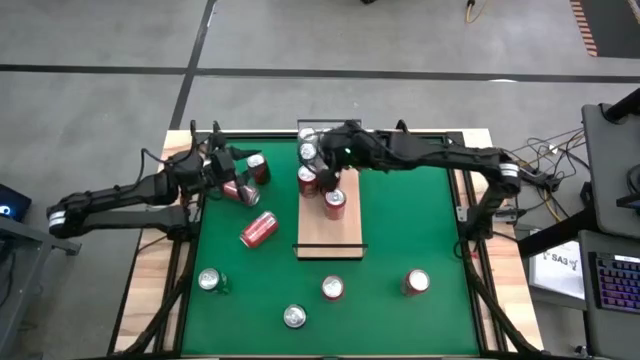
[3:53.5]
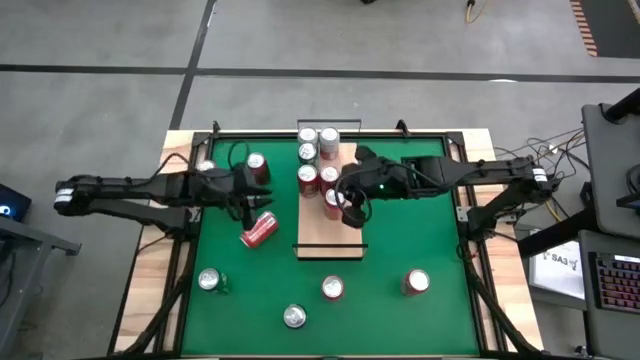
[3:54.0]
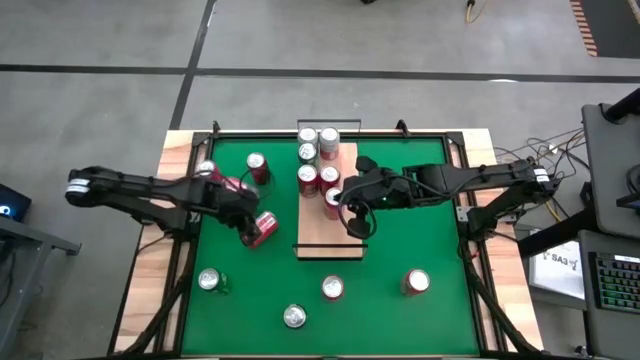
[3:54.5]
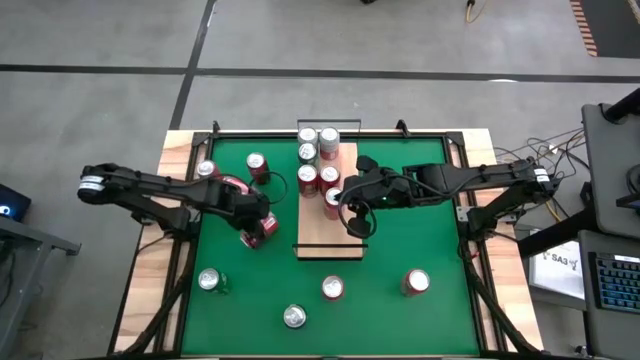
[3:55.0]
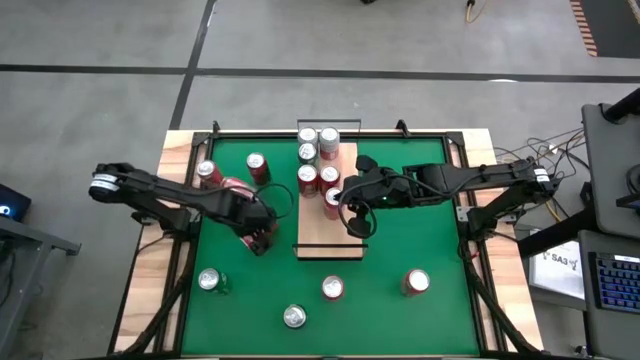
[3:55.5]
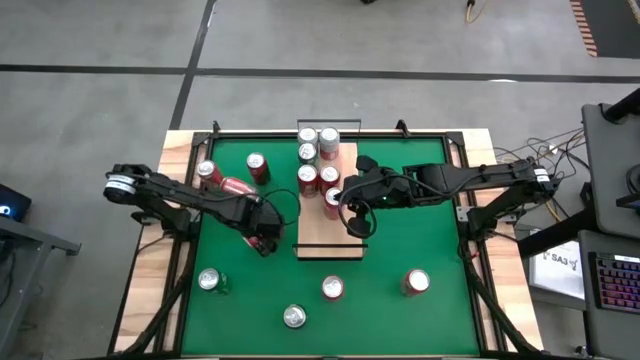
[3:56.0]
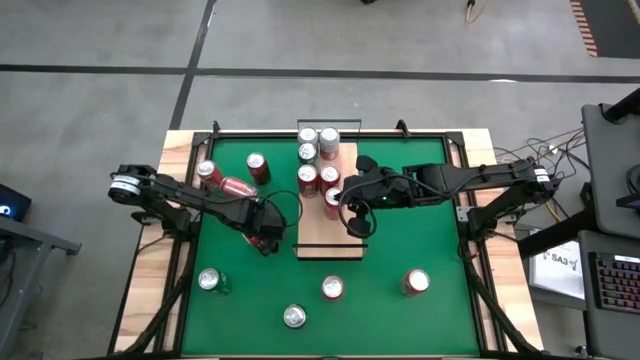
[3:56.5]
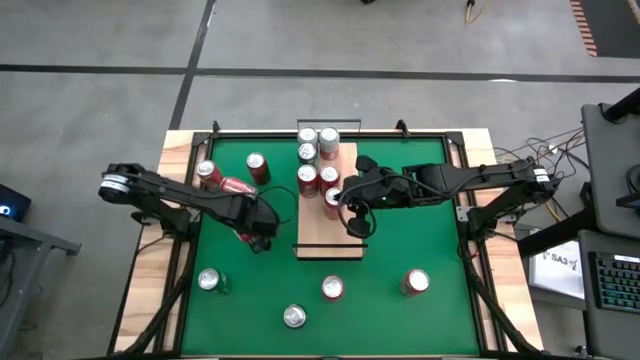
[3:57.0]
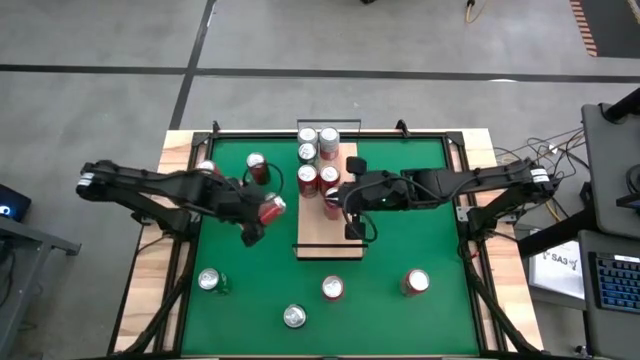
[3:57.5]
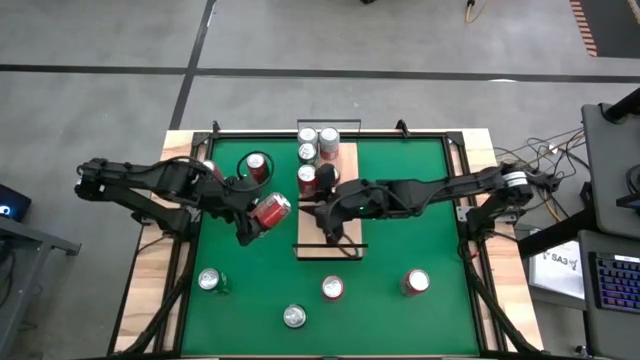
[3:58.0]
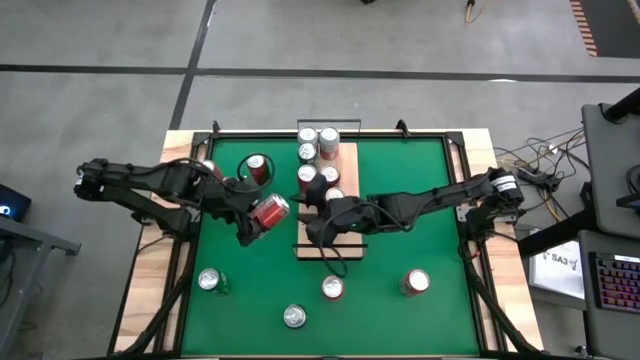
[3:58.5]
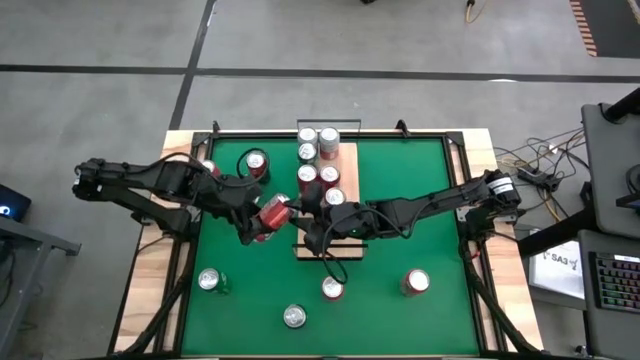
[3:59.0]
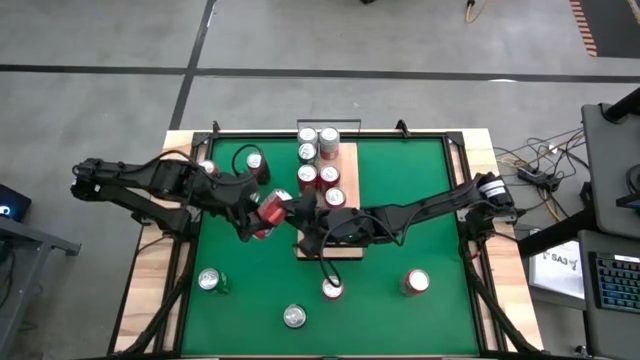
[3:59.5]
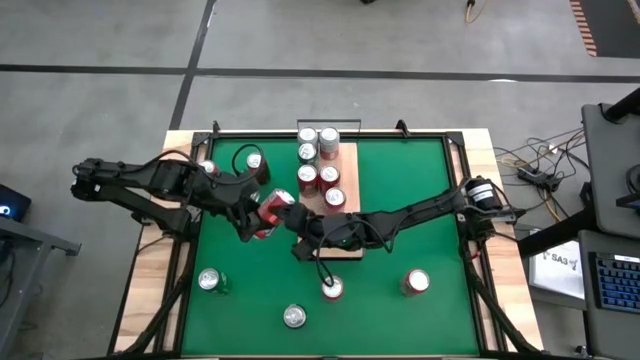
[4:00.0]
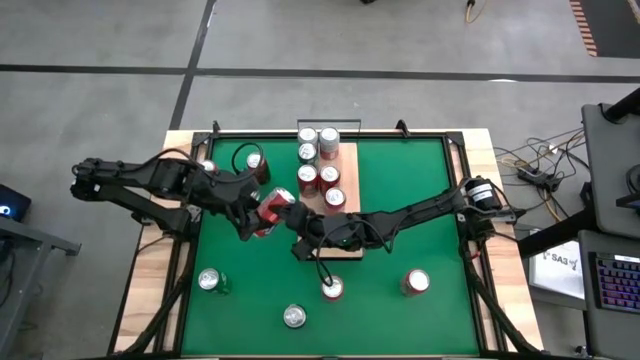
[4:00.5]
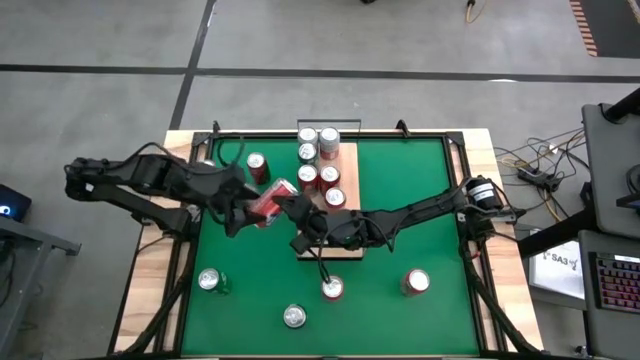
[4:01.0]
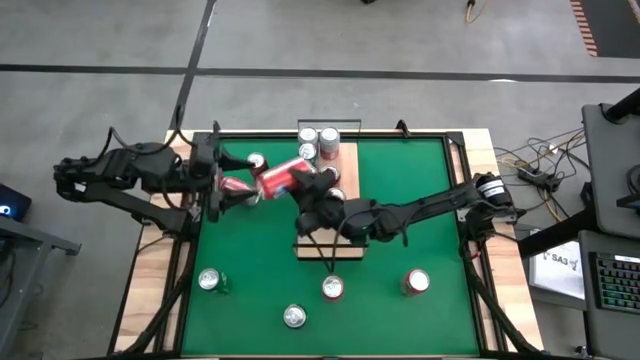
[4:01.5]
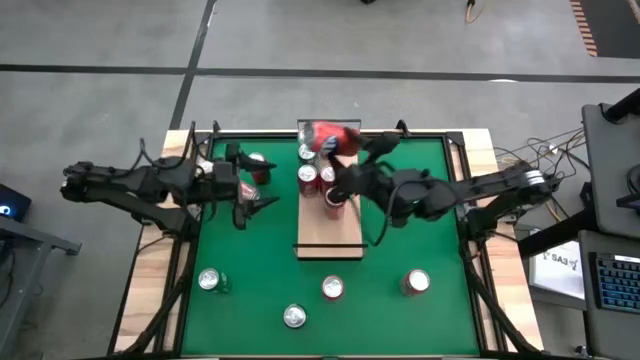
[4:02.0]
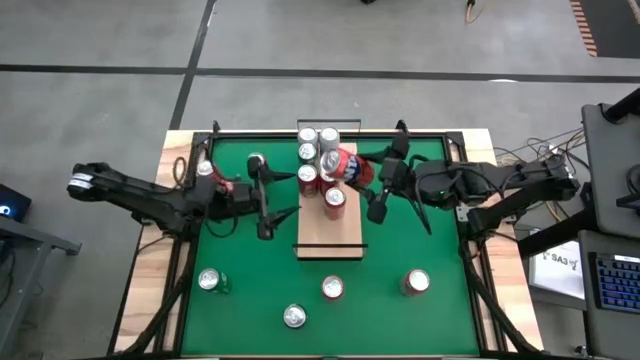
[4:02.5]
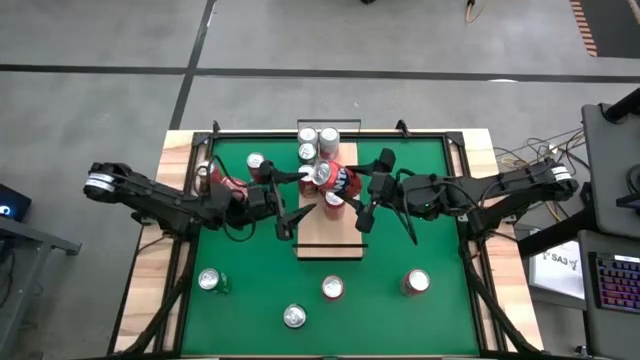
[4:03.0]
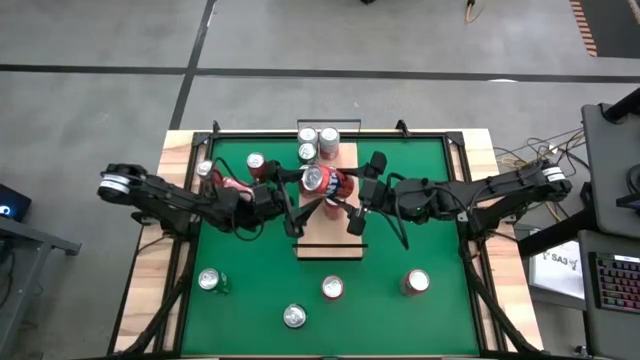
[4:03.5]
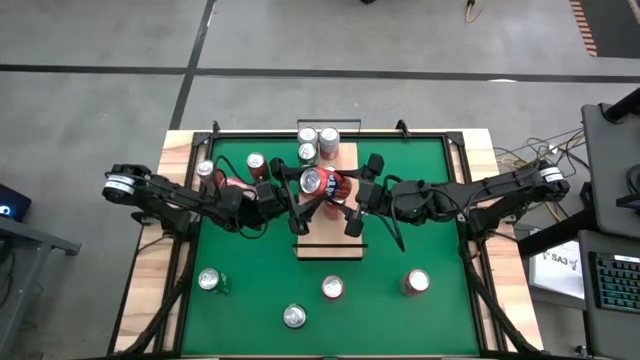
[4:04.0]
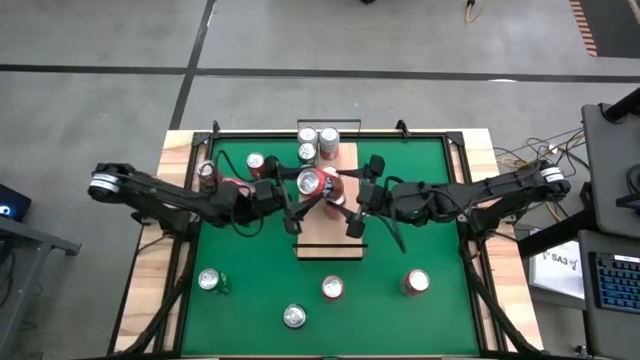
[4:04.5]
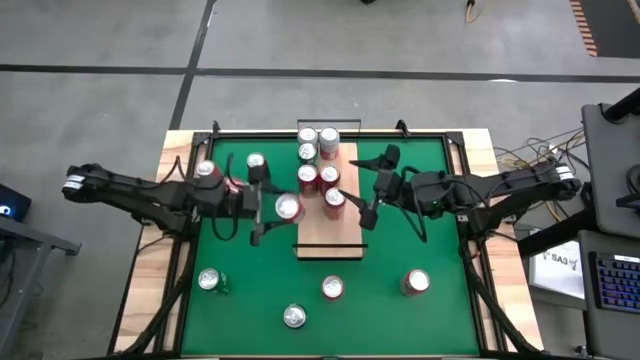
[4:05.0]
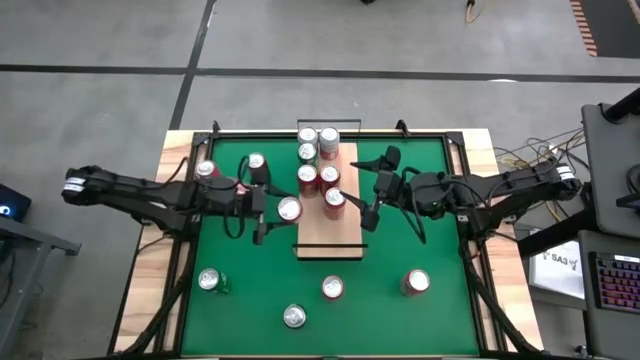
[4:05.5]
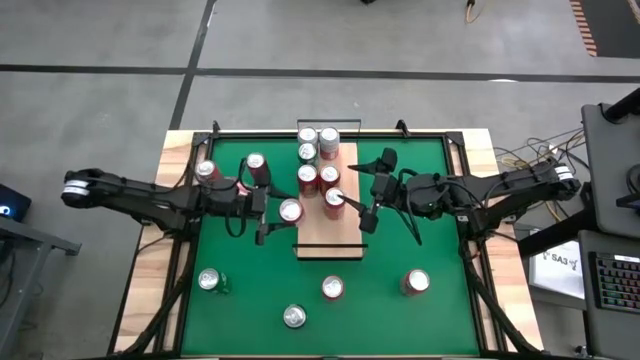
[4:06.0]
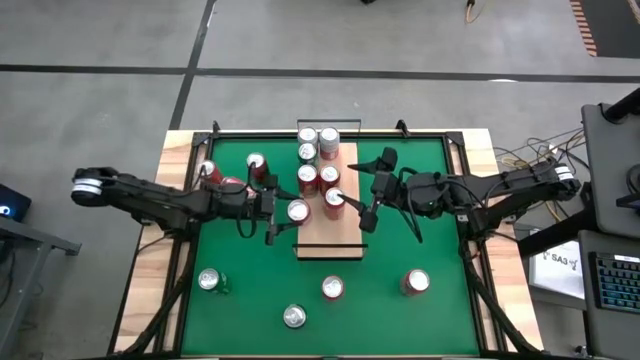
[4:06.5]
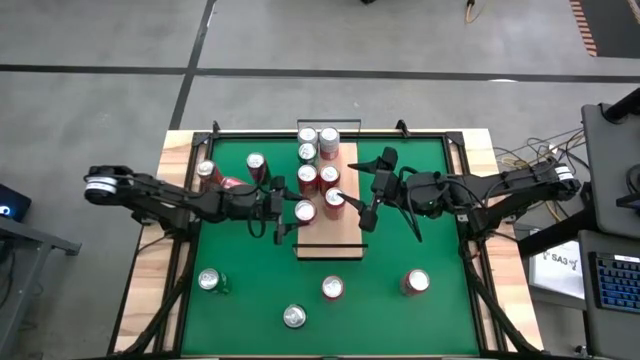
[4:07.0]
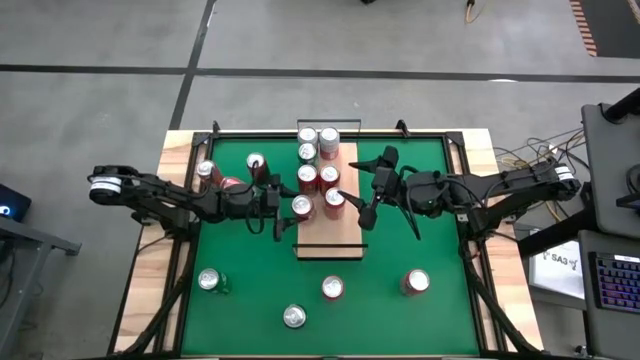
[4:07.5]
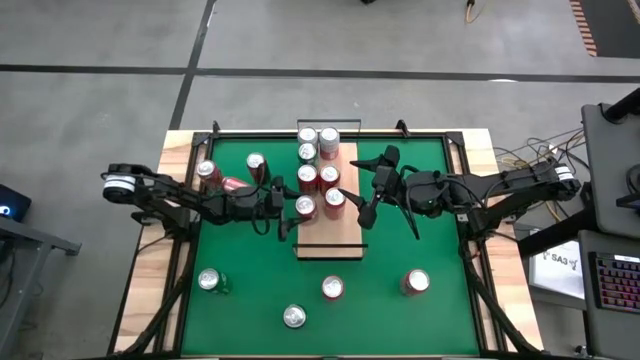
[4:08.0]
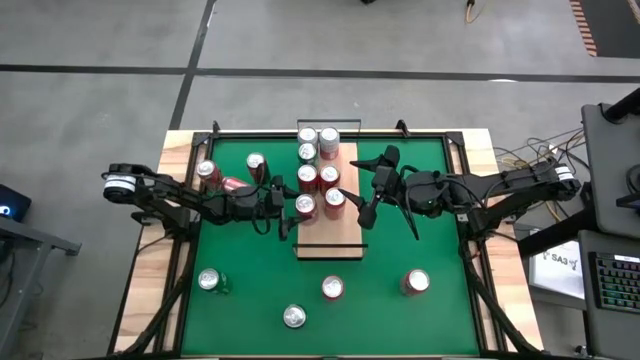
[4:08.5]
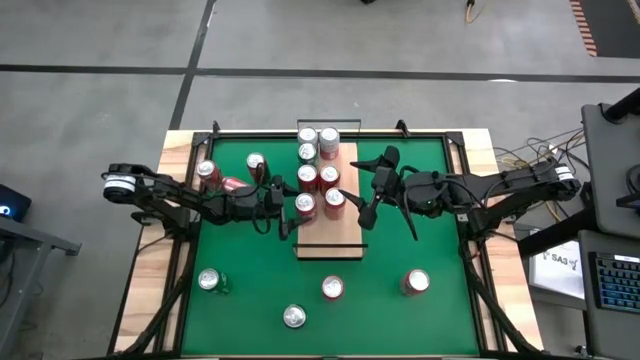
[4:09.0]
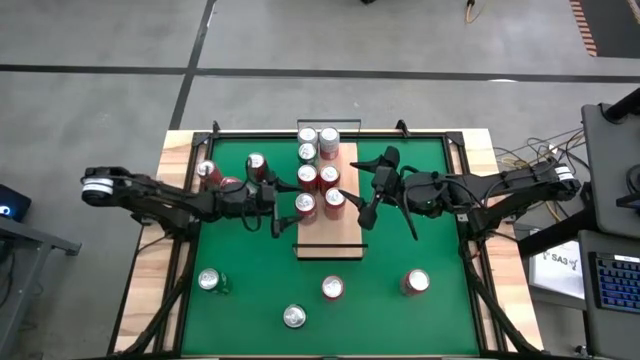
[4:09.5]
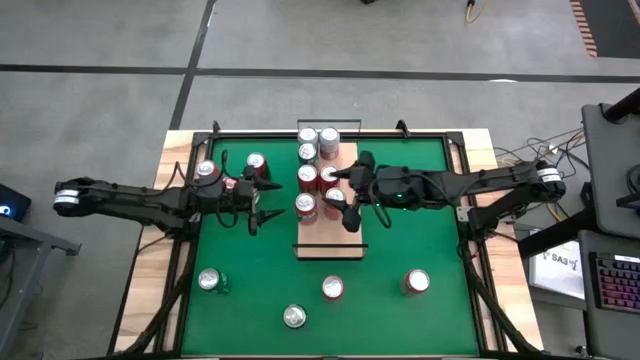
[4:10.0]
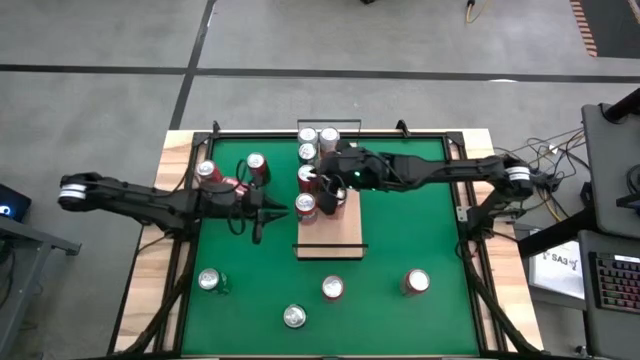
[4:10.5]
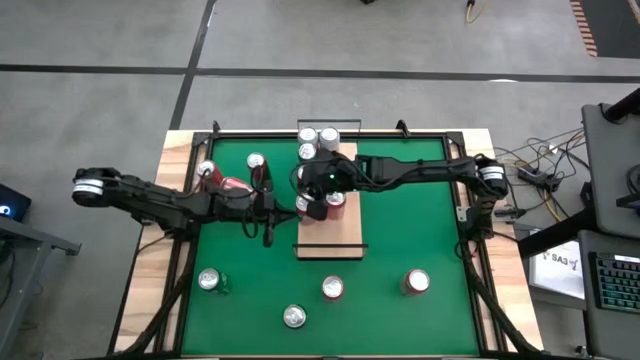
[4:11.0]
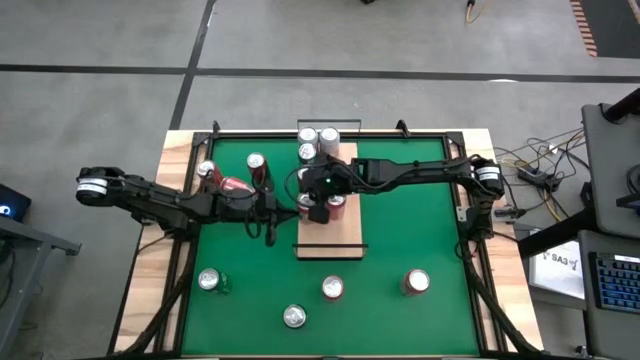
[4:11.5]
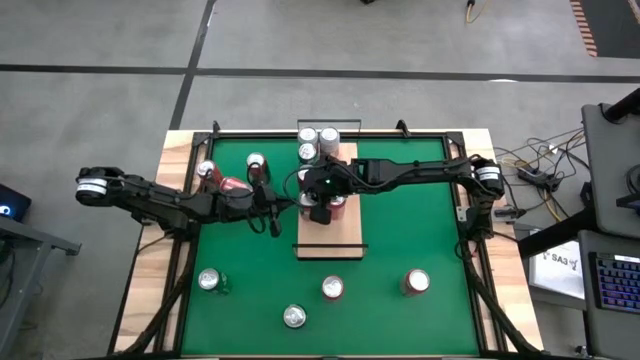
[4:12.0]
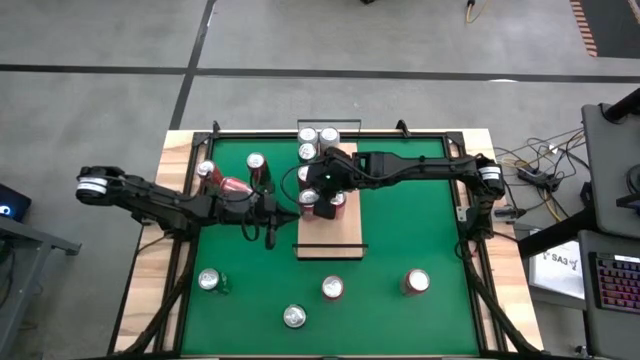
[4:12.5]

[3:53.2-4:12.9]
Task: Place canned beverage on shelf
Put the orange soda can on the shelf and aligned with the other orange soda can

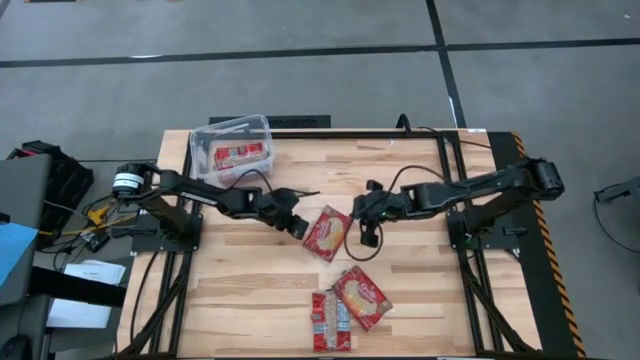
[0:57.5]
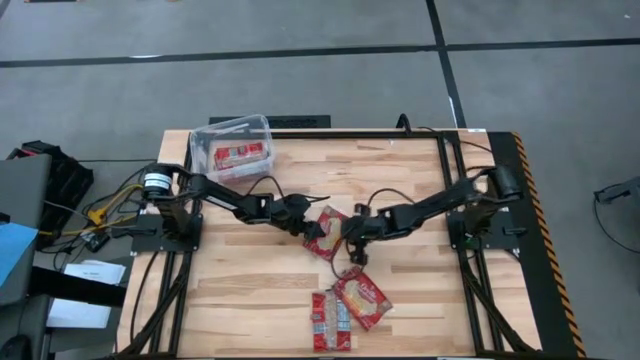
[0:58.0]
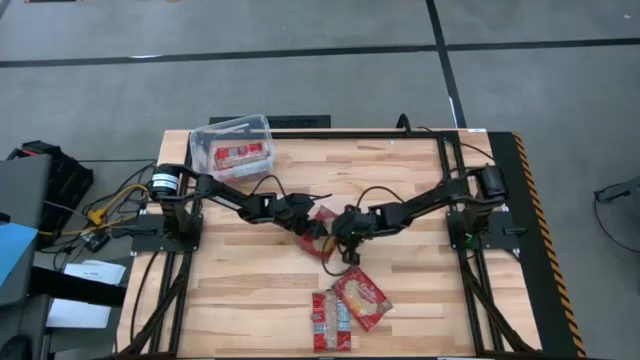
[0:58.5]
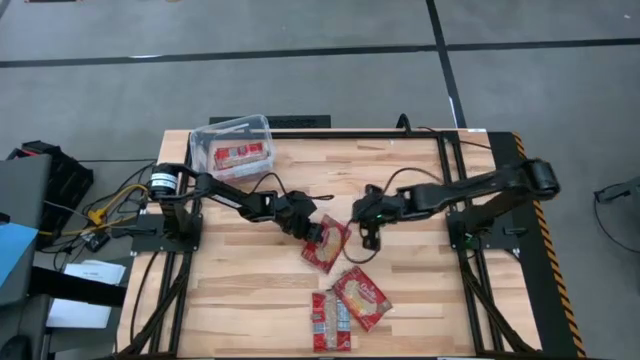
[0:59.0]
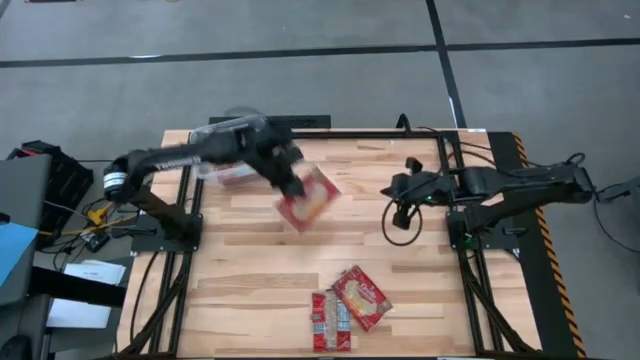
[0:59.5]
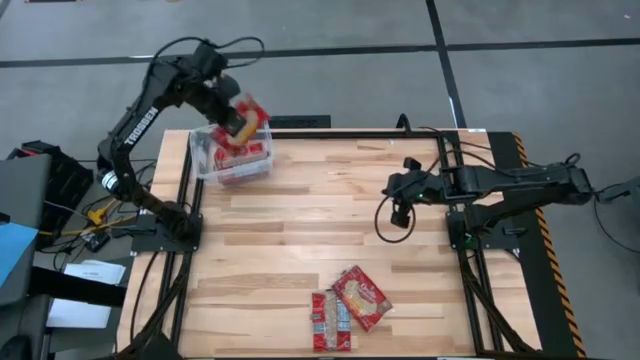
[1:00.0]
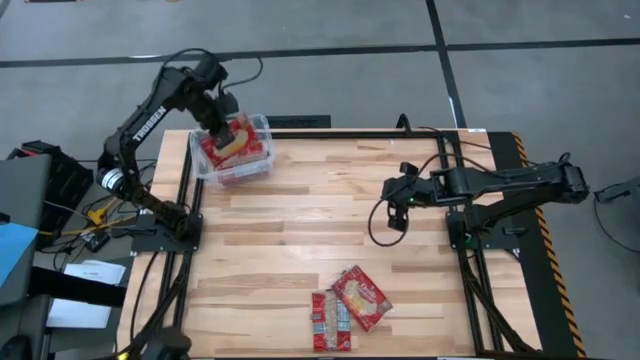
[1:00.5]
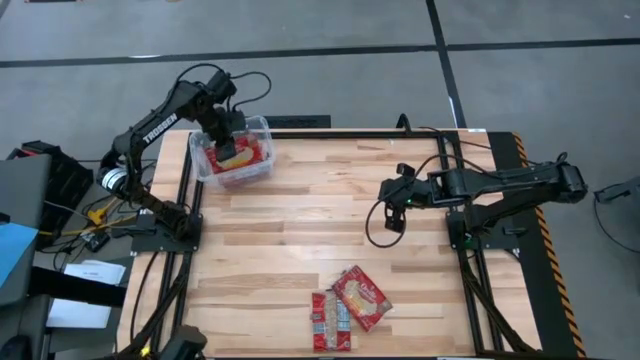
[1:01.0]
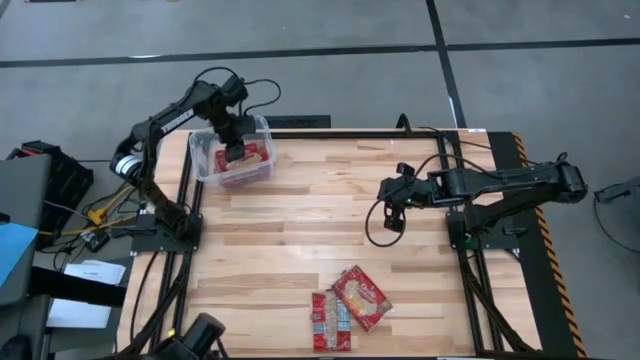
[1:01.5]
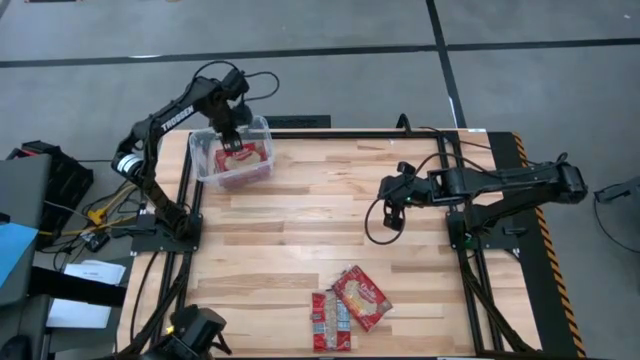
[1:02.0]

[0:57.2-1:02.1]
Task: Sort popcorn bags into baskets
Put the red popcorn bag into the transparent bin
